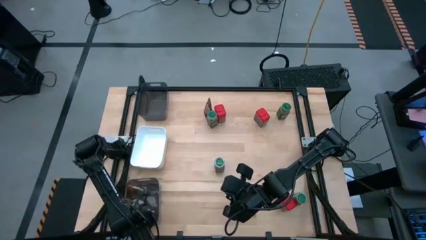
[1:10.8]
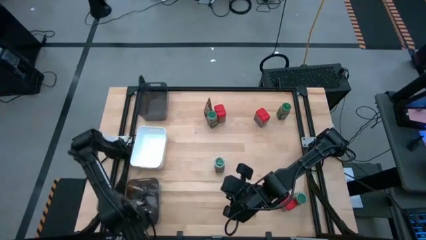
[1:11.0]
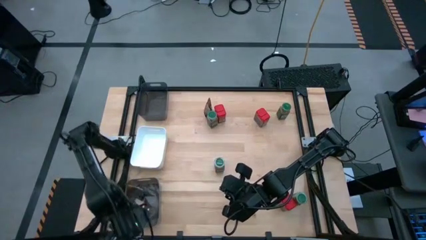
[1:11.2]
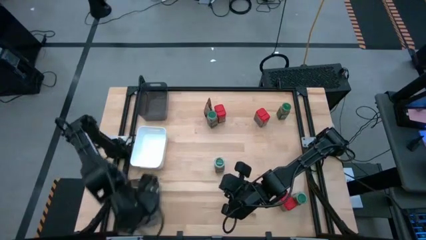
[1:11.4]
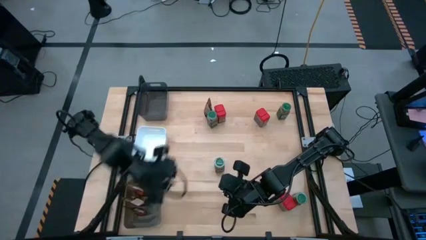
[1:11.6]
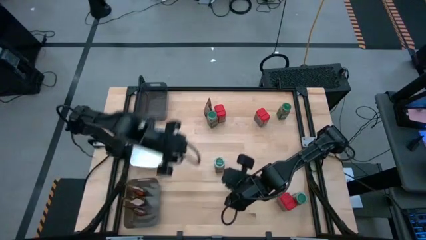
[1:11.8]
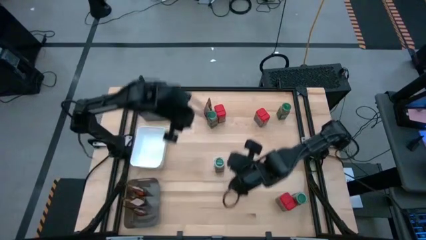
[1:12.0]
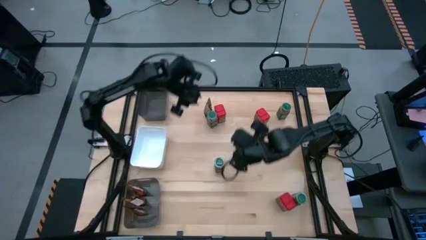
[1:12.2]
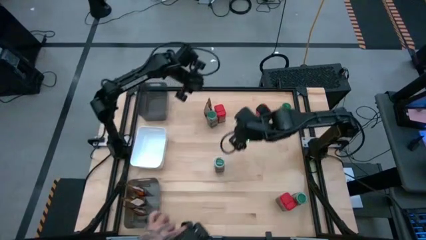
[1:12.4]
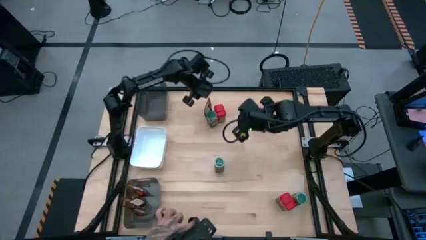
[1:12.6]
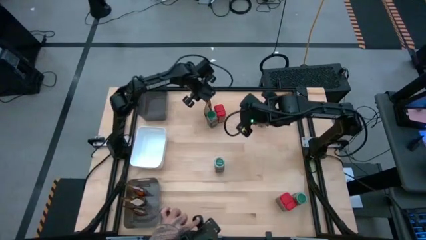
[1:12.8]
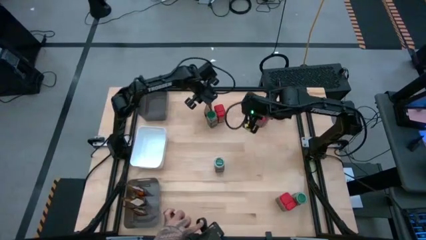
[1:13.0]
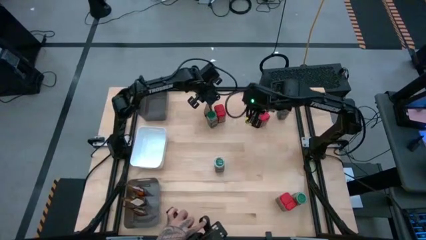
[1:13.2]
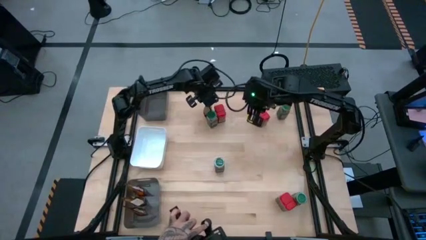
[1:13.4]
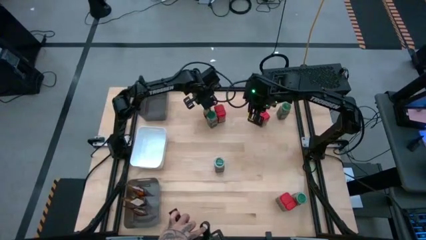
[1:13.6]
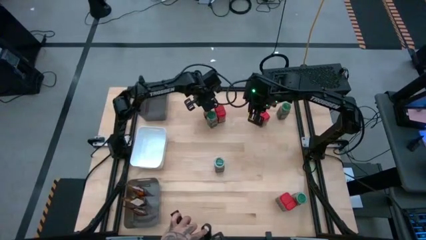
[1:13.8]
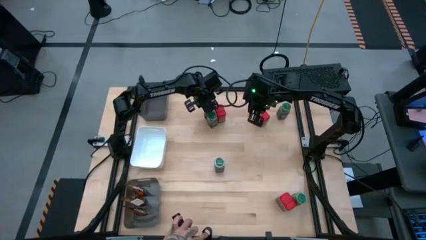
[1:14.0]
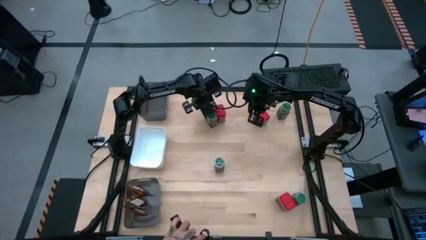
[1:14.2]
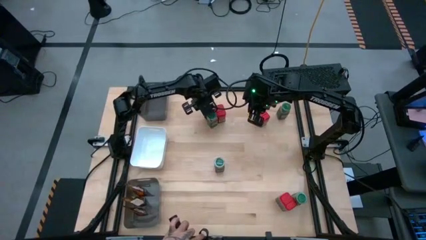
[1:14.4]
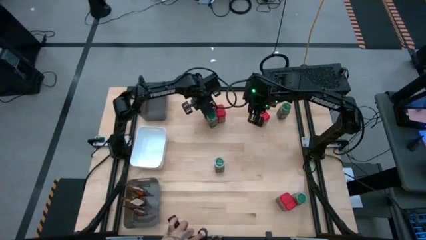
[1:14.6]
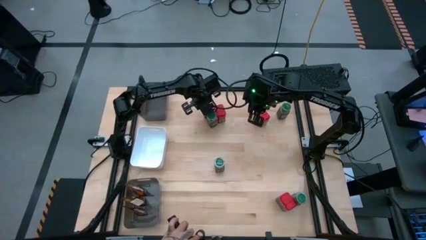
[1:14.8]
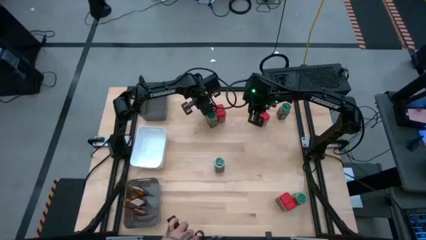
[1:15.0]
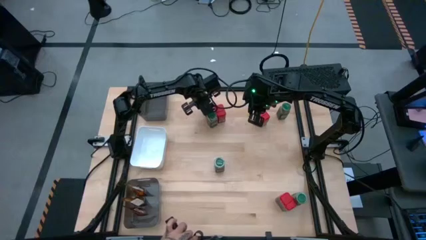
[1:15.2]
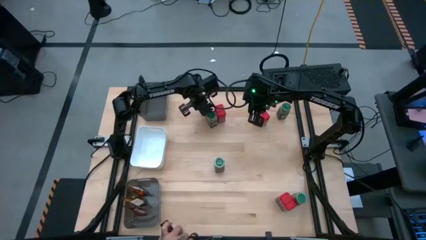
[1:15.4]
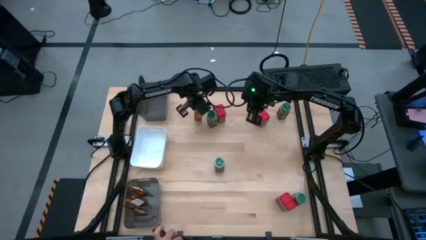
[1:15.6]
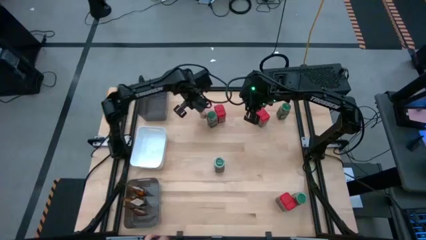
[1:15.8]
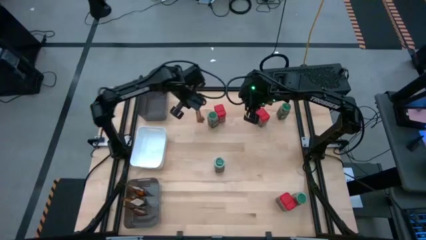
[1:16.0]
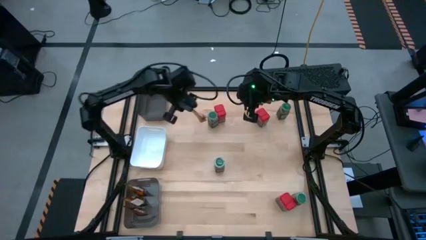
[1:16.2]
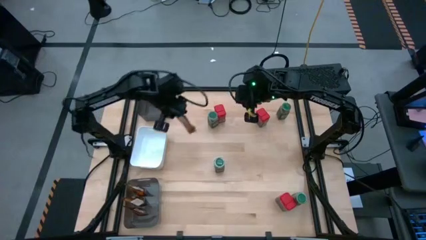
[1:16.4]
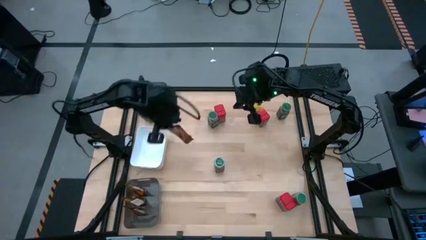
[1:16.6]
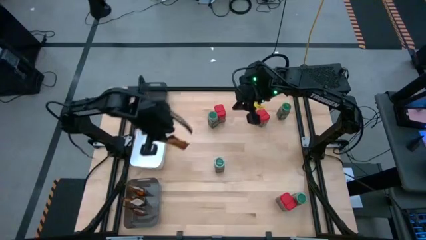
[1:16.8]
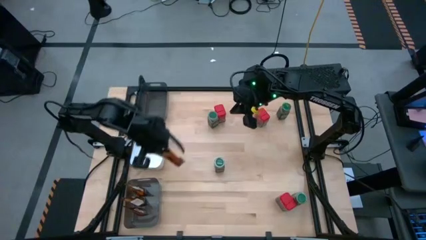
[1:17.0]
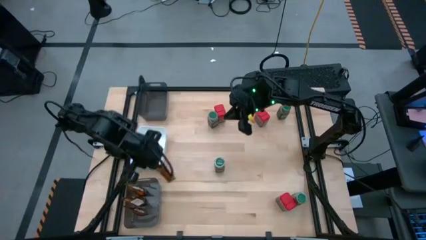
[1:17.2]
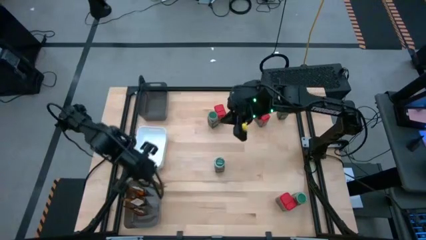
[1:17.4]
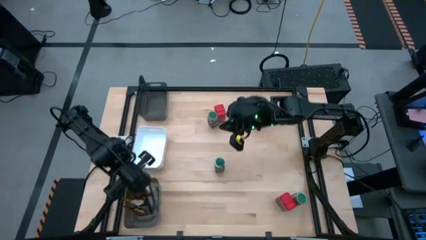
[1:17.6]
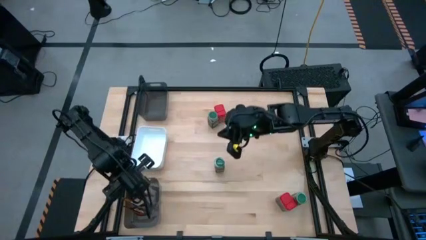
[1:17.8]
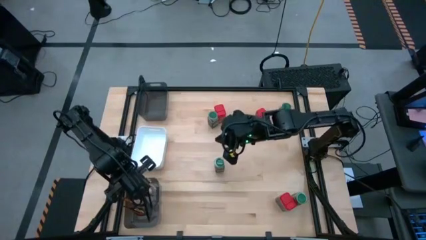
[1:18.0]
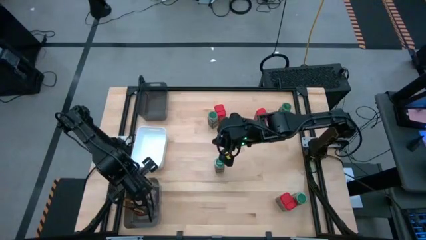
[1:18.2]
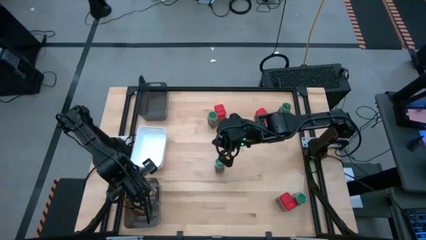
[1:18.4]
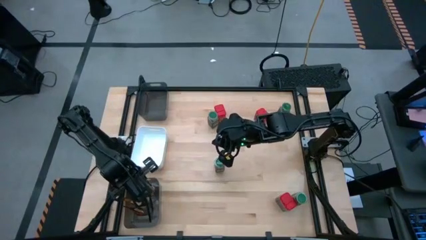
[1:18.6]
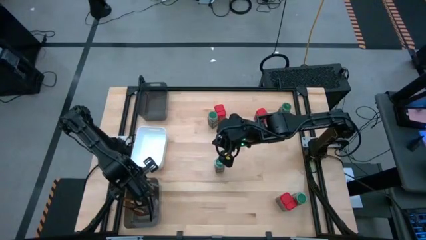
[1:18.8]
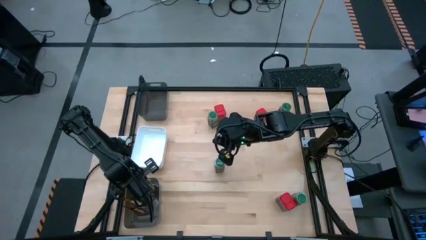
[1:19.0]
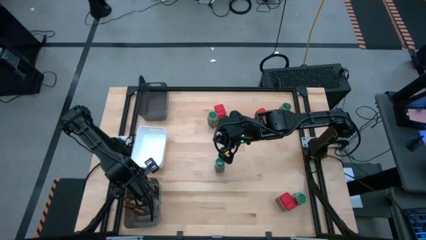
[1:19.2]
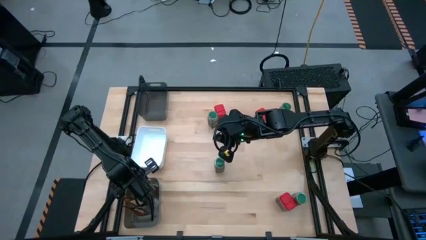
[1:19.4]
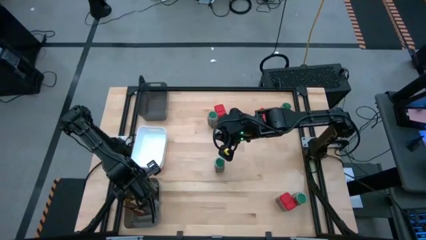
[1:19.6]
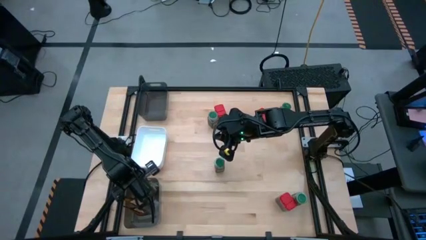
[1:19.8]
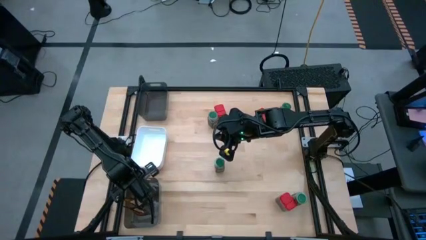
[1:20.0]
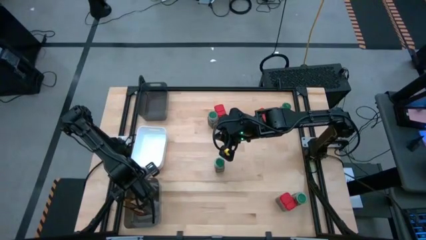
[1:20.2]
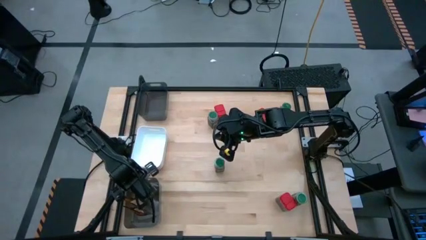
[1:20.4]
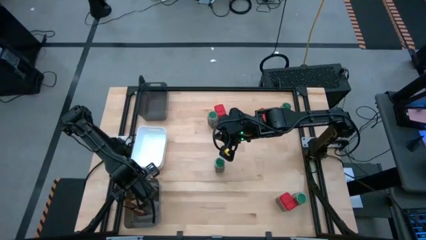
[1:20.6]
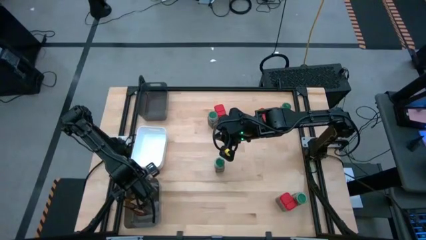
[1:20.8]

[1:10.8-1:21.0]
Task: Sort spices by type
Put the orange seasoning bag into the bottom black bin

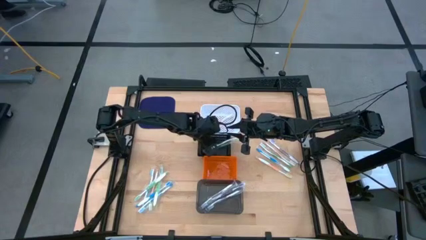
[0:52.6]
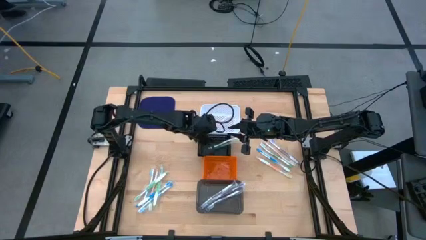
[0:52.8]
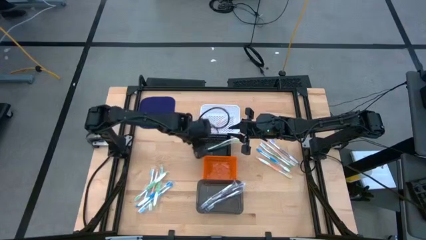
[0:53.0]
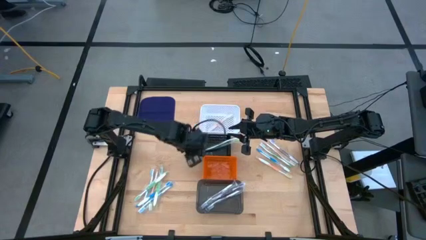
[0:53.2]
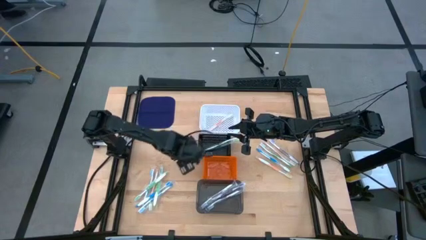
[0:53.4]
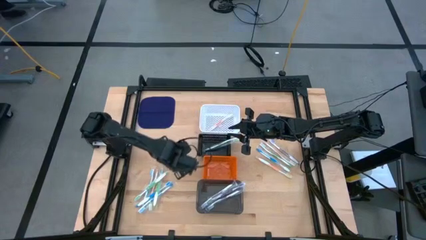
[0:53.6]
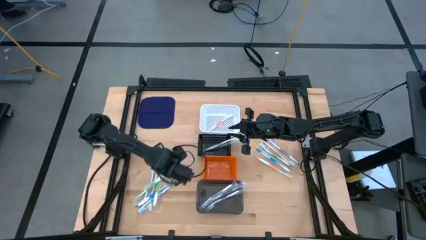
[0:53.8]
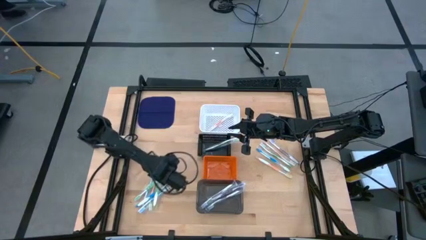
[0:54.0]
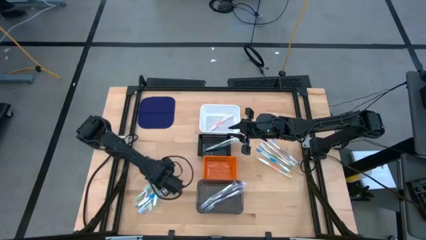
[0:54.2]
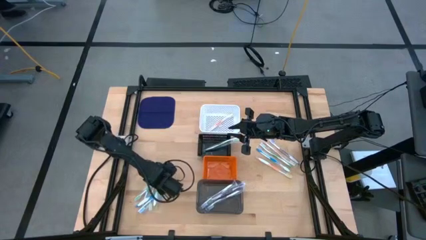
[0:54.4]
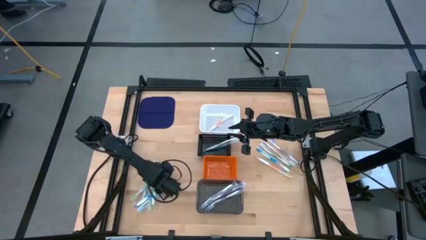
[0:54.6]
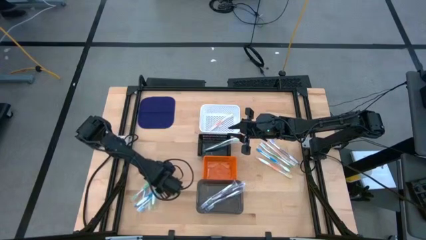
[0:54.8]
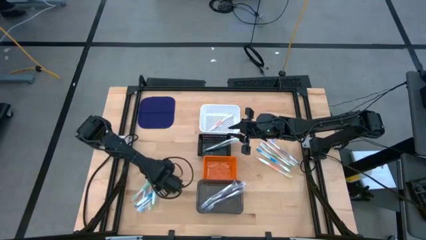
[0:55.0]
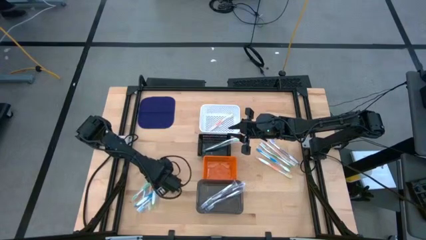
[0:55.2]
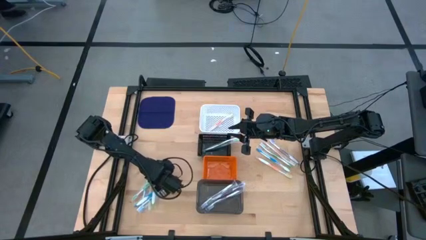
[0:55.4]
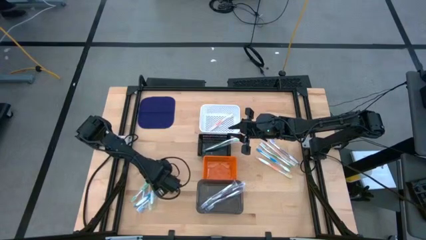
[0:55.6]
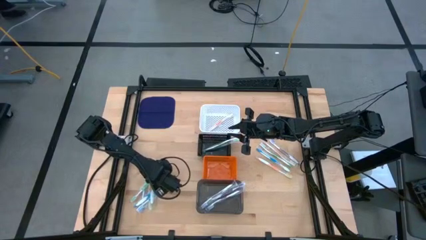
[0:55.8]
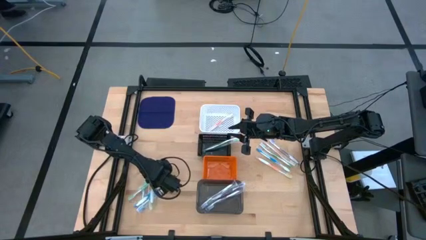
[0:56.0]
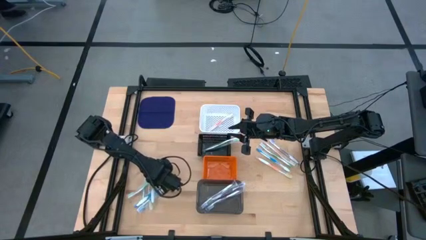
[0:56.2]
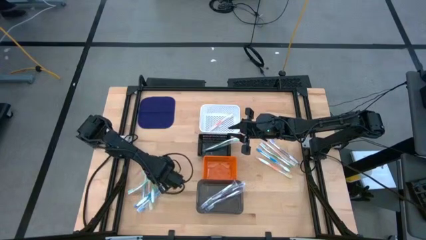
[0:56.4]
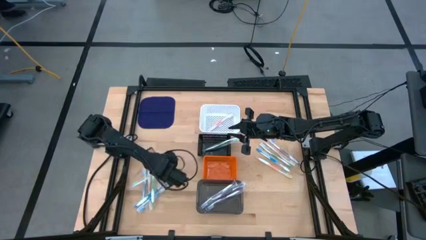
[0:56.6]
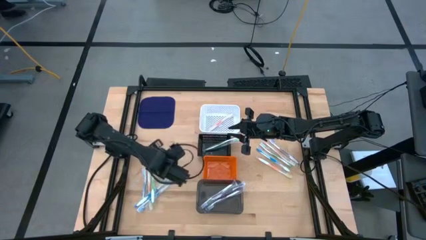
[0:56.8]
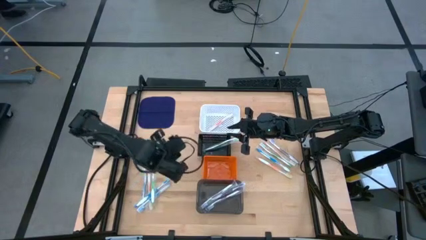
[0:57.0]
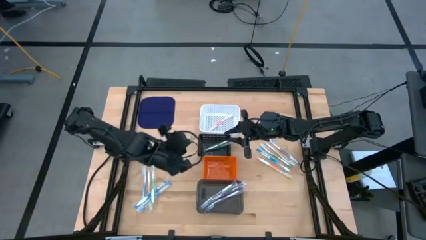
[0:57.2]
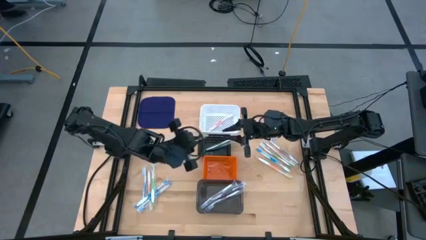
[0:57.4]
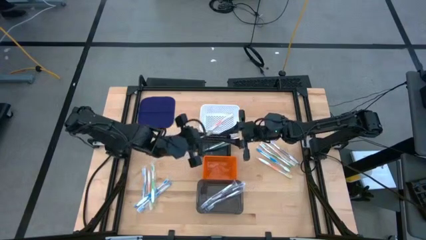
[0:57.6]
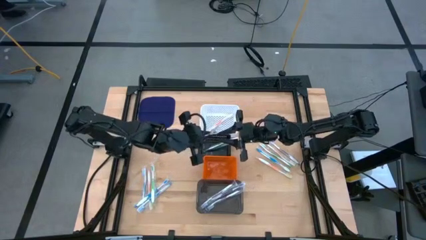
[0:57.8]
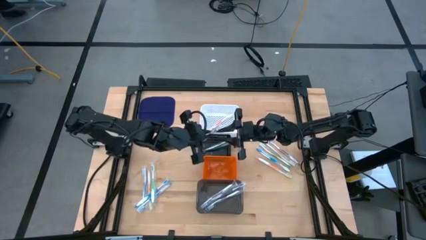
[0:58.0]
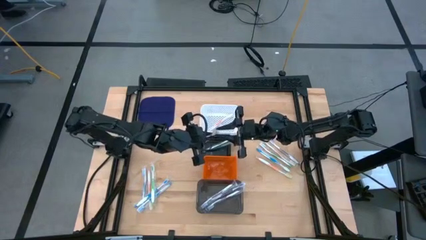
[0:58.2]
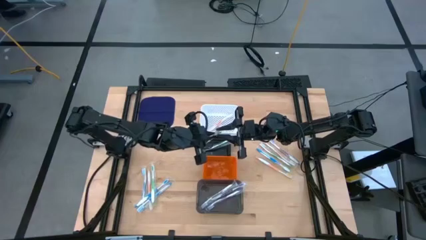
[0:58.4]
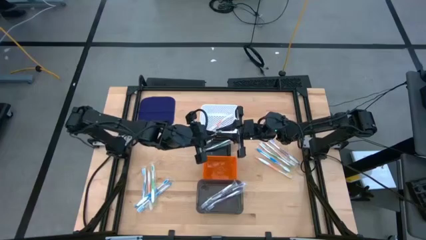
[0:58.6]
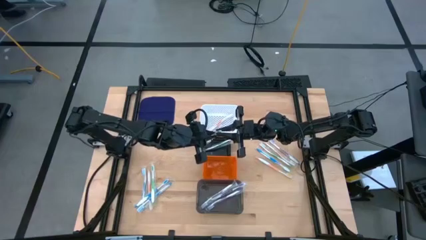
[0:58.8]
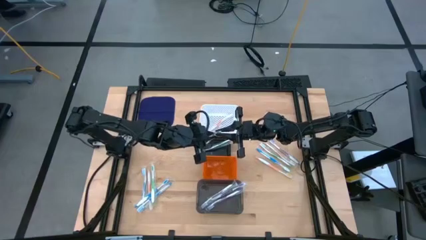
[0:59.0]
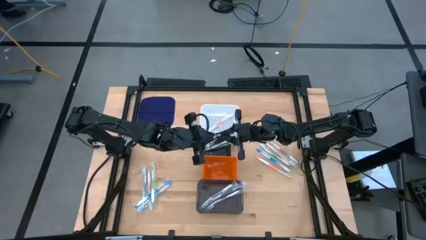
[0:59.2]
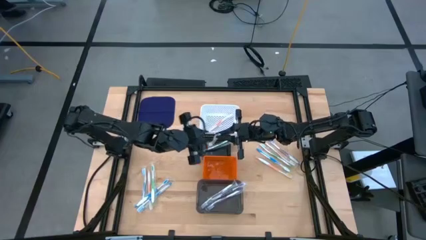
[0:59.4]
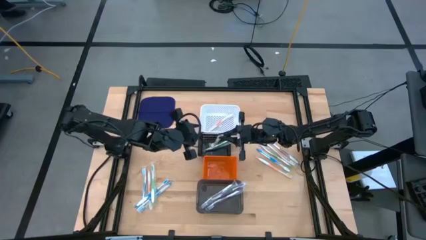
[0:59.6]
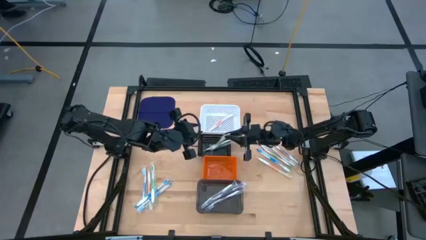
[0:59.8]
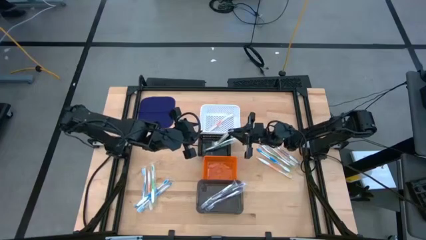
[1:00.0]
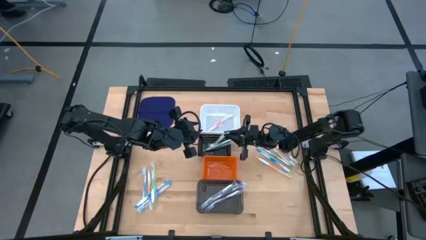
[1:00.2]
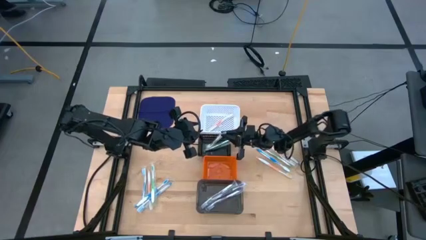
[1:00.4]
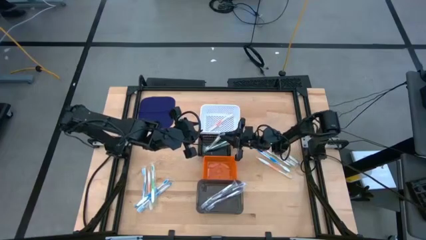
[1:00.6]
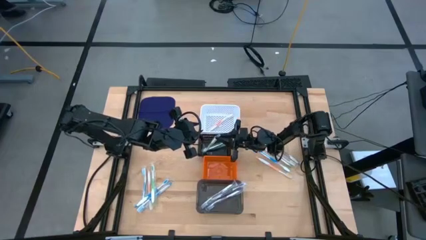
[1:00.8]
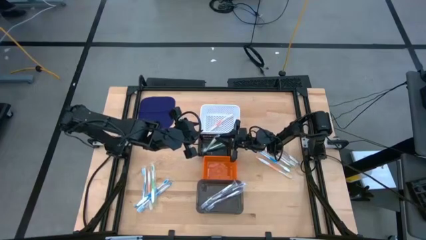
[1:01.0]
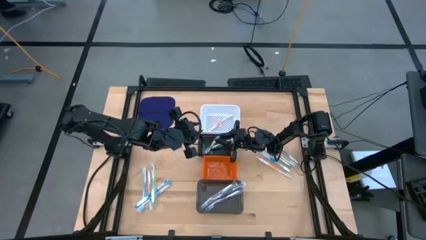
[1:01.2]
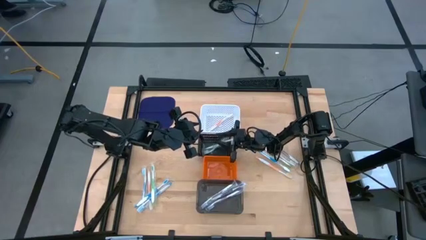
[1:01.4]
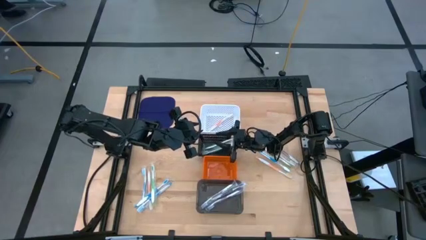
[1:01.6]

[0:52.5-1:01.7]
Task: Pick & Place Toothbrushes
Put the green toothbrush into the black basket
